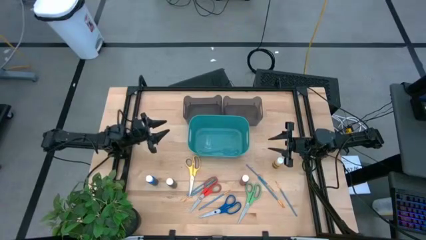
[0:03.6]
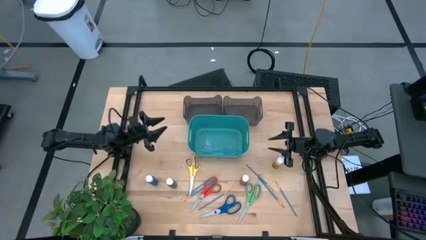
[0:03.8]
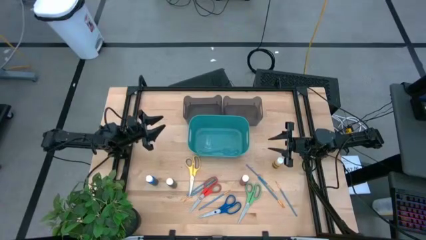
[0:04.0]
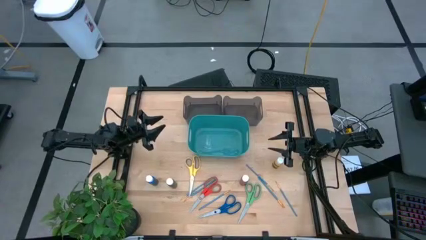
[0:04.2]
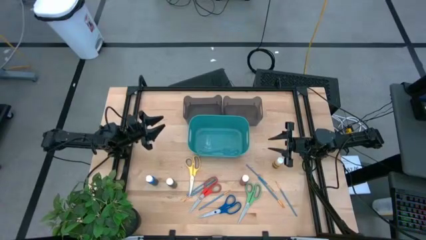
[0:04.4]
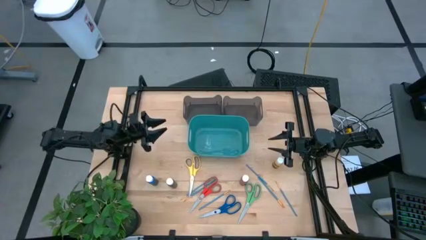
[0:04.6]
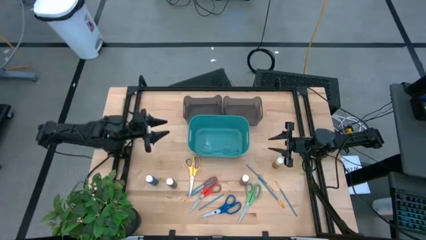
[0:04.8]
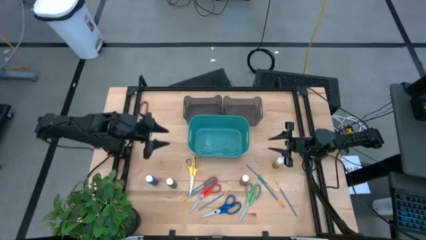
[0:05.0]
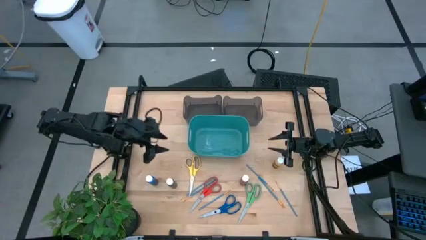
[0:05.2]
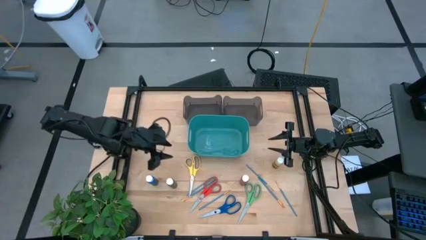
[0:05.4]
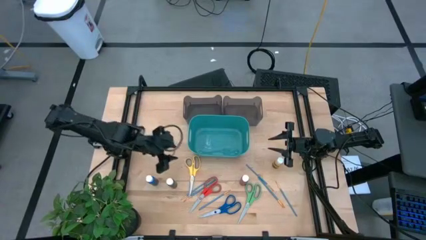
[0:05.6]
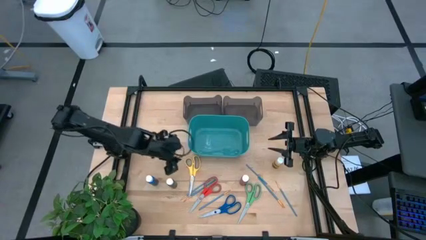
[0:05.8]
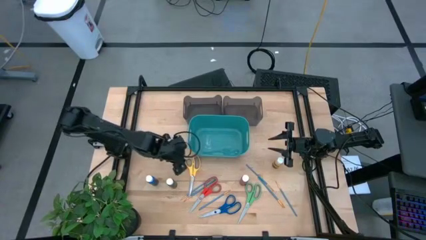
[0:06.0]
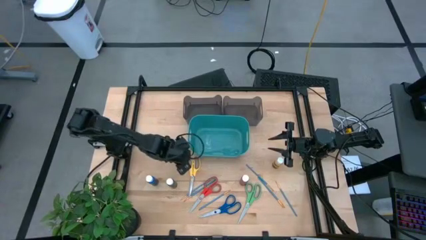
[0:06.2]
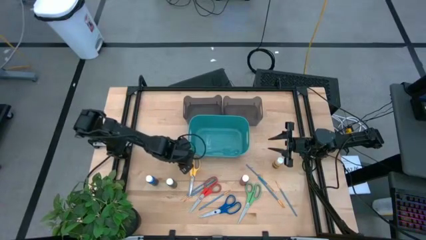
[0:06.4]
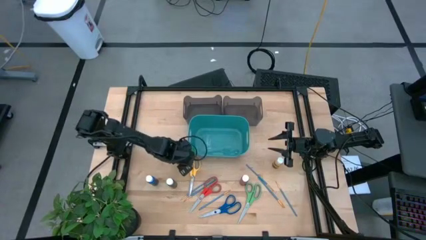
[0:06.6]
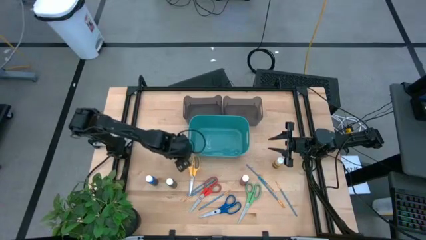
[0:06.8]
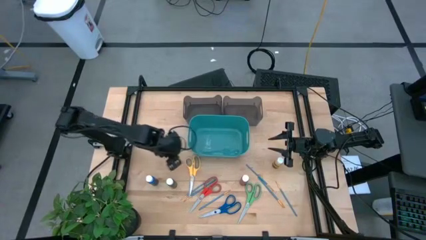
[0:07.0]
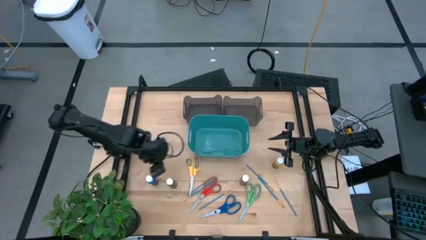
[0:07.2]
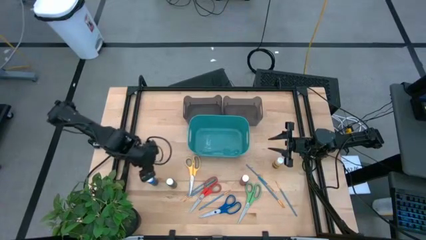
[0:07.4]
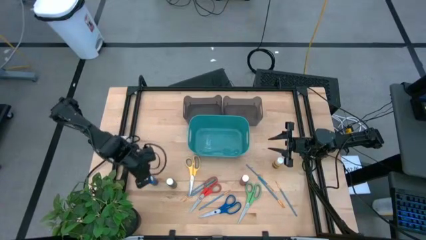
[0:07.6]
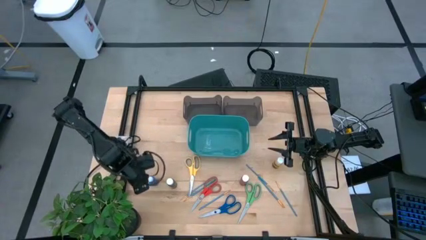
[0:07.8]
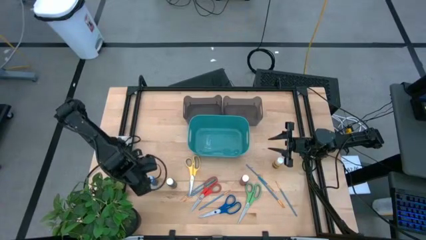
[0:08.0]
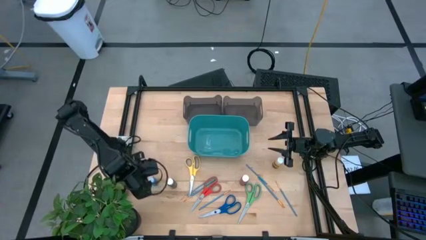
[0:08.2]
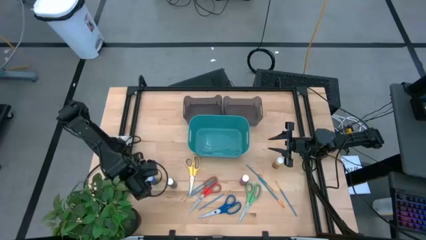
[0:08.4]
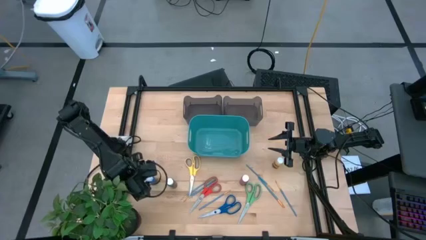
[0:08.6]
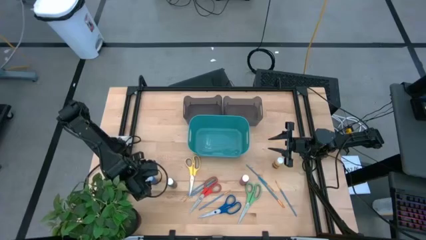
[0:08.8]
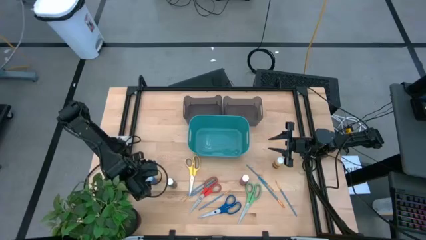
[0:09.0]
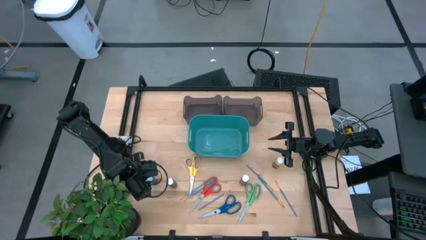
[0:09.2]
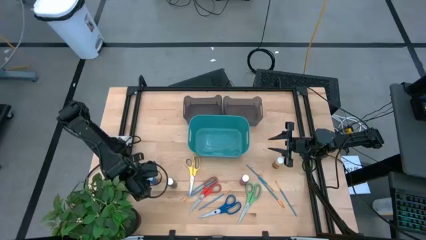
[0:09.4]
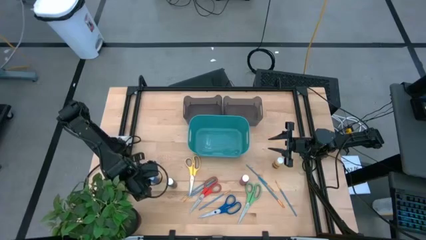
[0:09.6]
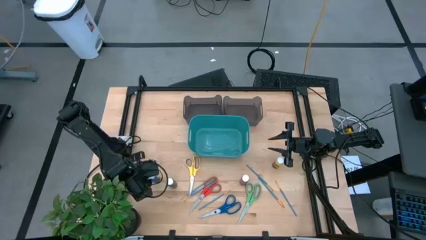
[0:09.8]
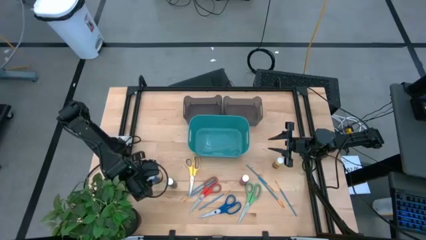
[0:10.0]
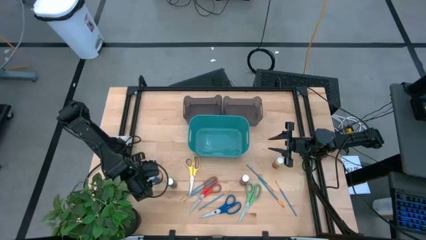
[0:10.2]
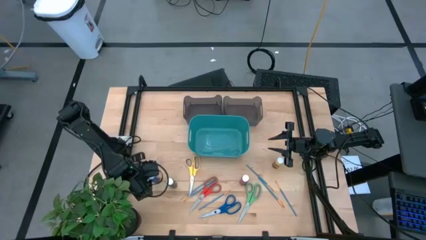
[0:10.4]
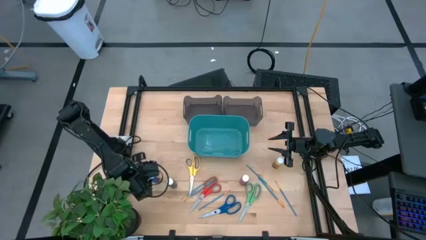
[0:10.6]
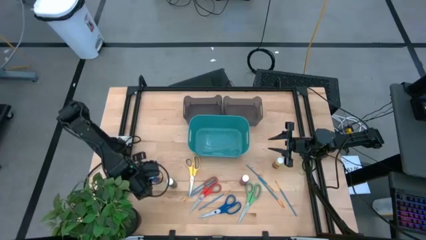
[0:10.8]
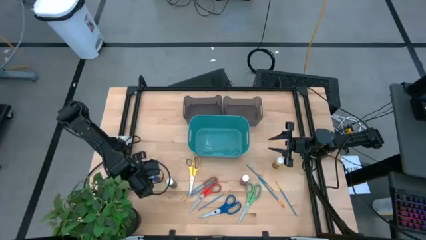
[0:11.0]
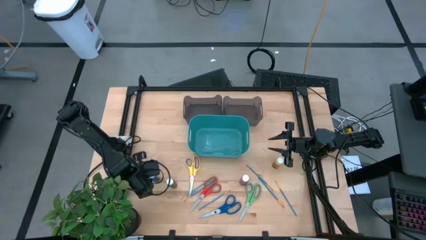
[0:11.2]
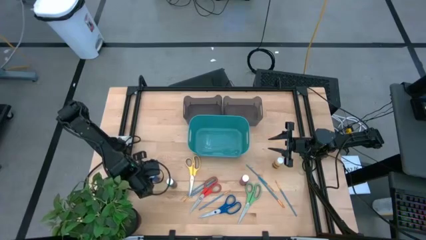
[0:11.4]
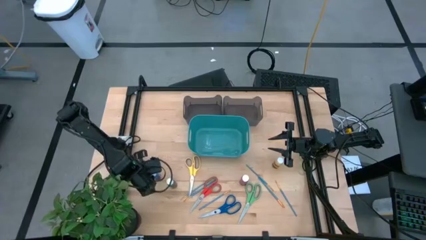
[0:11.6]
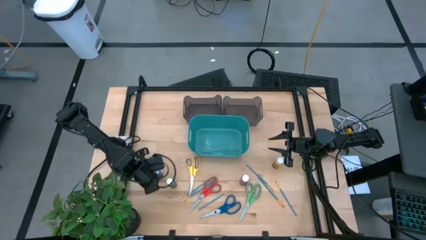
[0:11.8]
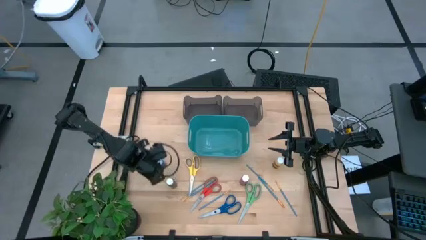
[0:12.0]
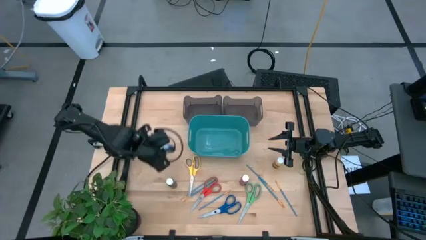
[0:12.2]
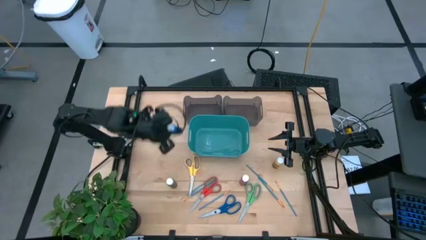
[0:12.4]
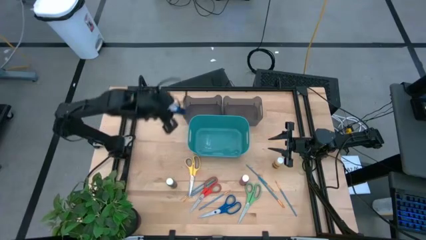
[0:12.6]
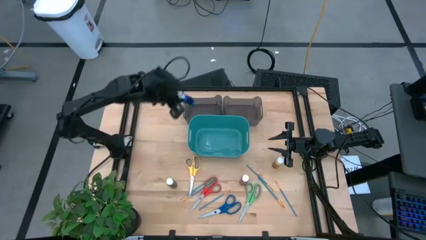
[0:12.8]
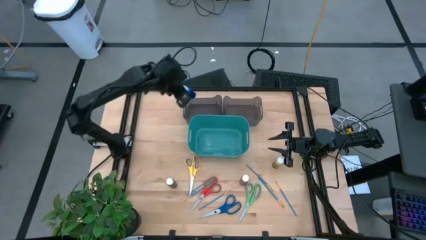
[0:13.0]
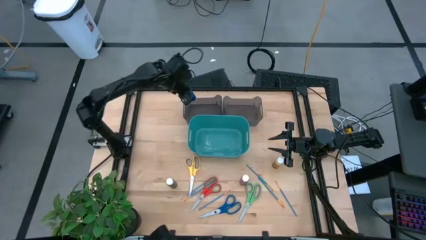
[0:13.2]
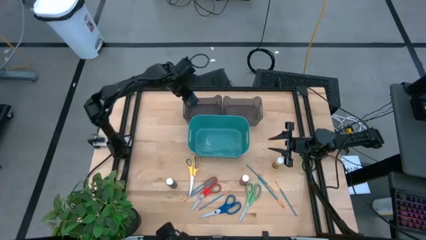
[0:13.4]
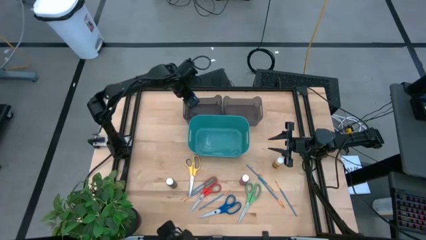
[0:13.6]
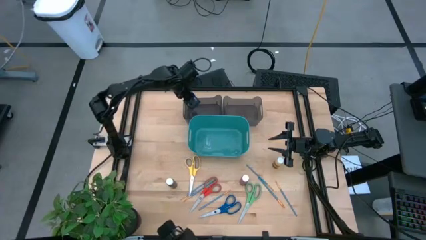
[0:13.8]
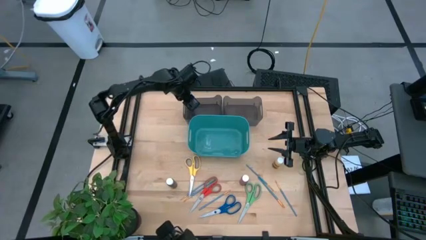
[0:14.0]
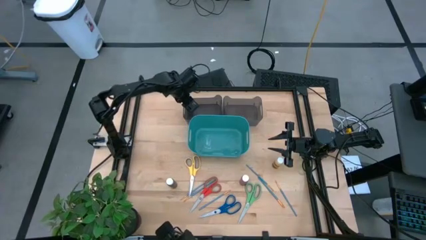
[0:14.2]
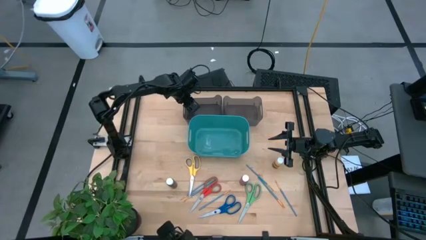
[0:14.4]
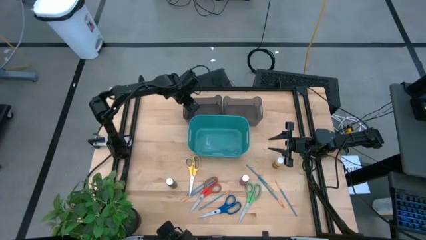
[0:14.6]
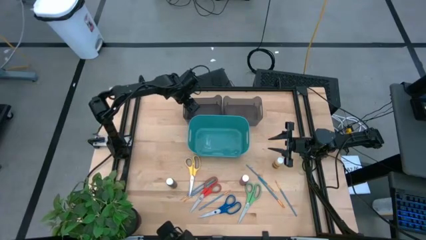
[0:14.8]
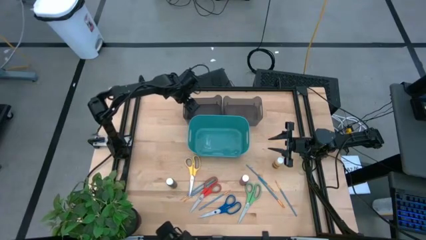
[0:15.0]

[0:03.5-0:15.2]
Task: Pick & Place Paint Supplies
Put the blue paint bottle into the left black bin

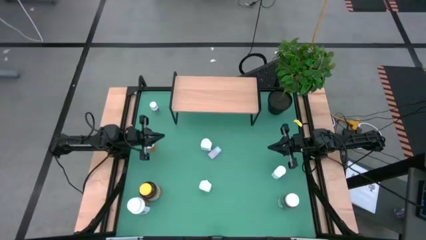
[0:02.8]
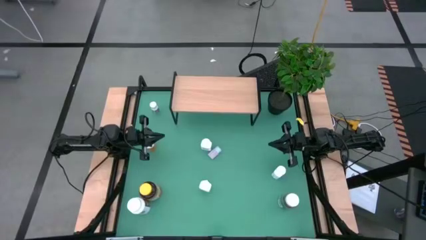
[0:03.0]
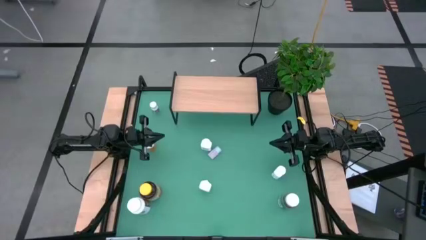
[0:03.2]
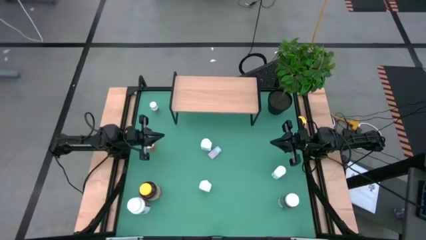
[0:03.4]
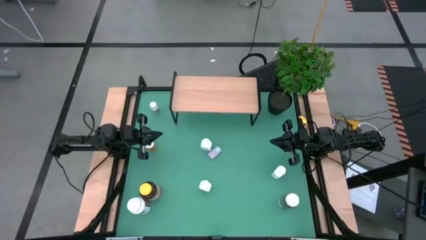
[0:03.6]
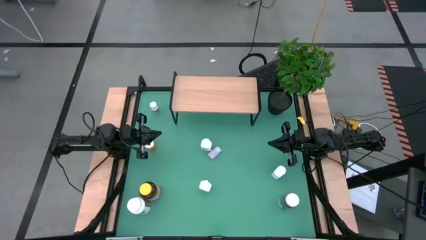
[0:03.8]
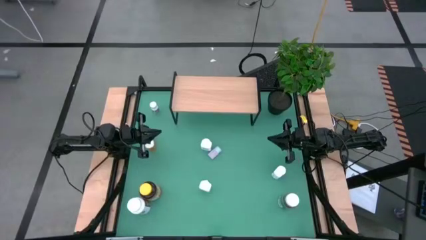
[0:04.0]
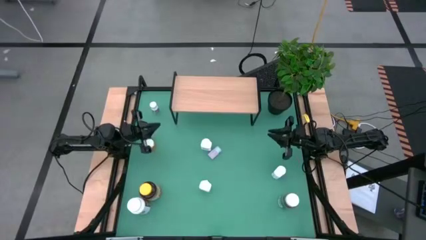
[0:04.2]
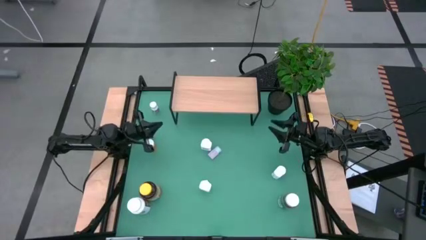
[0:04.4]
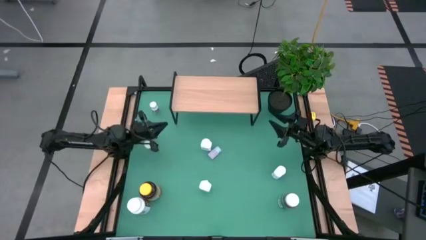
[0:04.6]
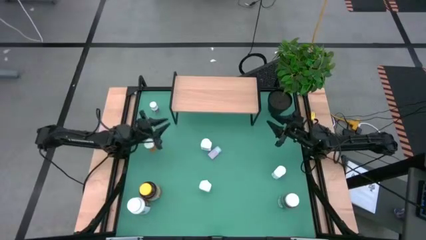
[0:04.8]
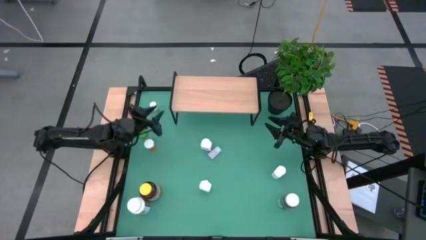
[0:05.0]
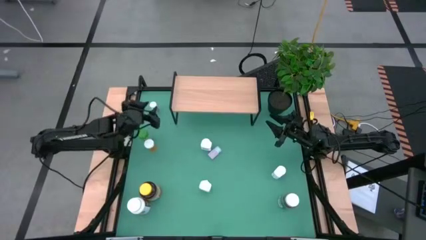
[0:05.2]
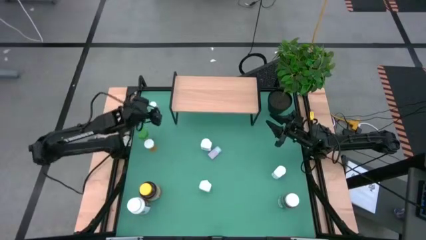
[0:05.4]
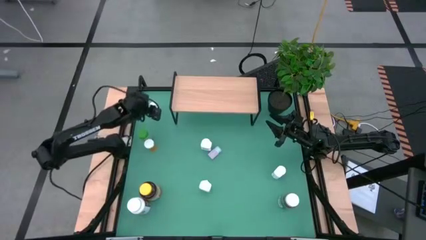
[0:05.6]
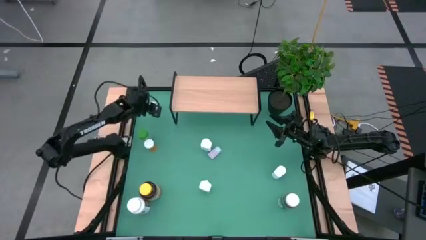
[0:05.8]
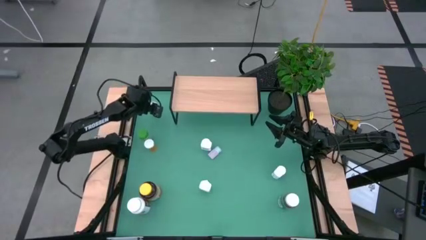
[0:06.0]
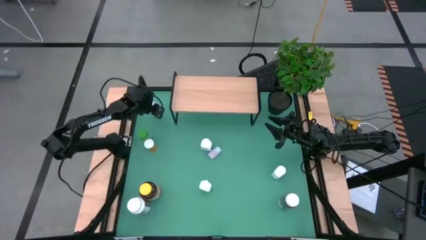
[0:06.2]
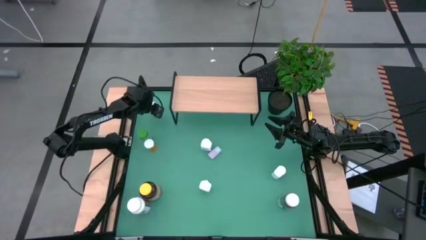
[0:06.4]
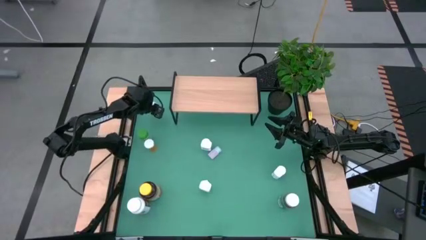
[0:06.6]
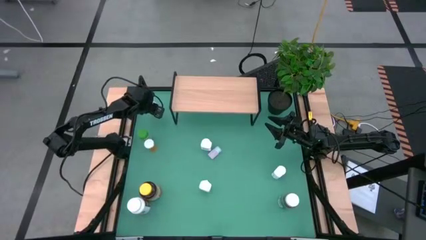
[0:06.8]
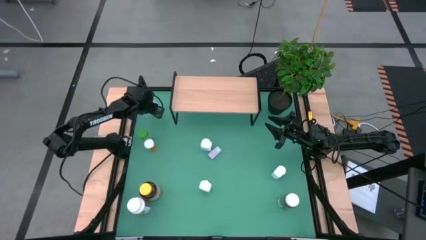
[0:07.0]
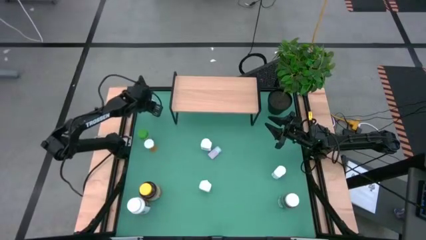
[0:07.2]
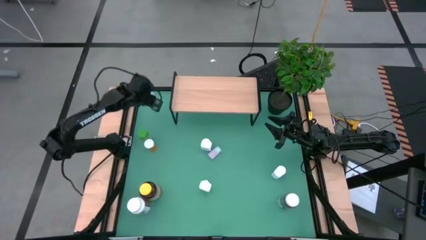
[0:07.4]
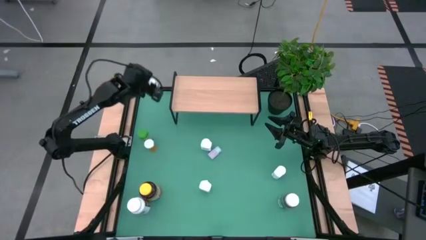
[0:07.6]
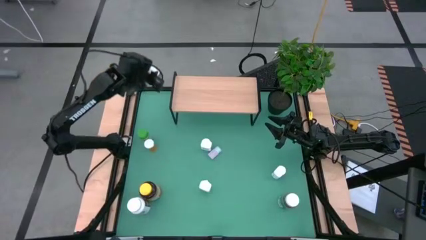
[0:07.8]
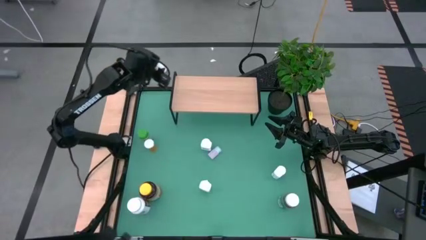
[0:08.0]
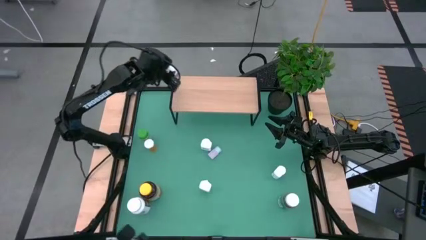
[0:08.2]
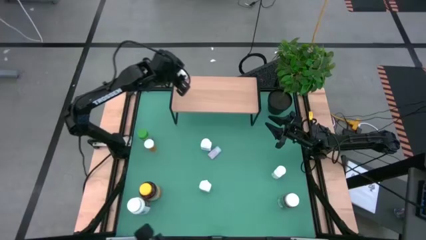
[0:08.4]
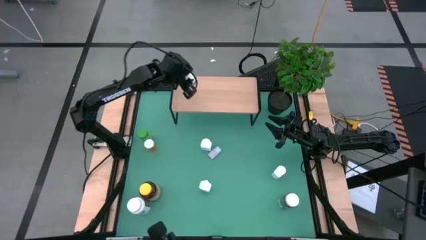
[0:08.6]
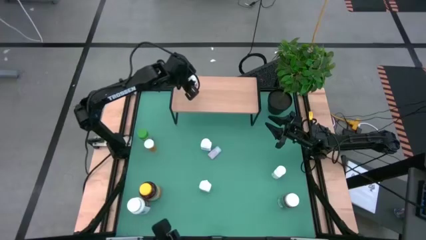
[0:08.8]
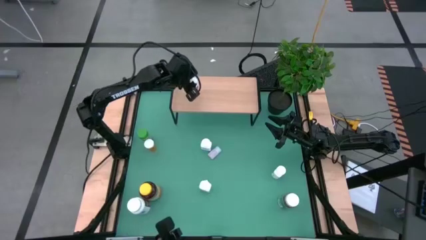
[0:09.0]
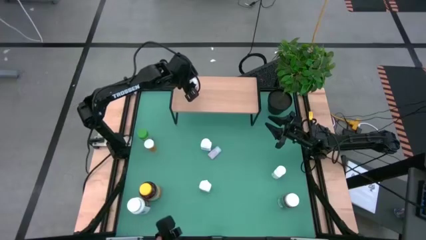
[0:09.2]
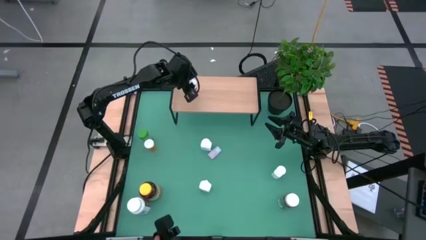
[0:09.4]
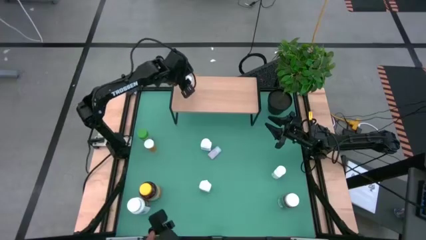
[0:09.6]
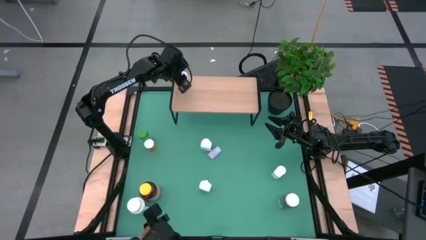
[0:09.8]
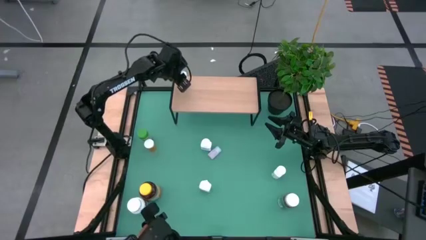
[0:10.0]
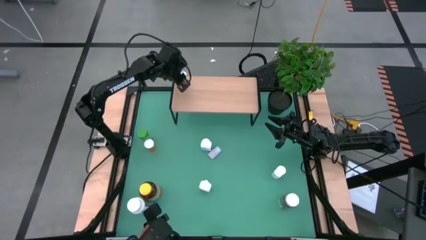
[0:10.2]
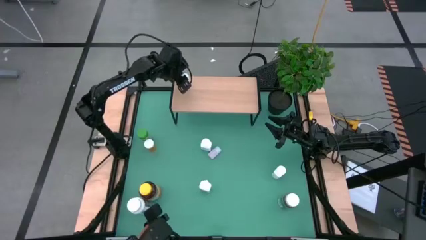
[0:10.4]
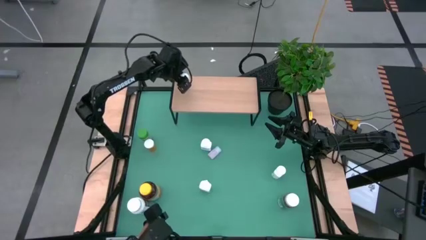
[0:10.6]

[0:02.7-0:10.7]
Task: Pick and place medicine bottles onto shelf by color
Put the white and blue bottle on the shelf
